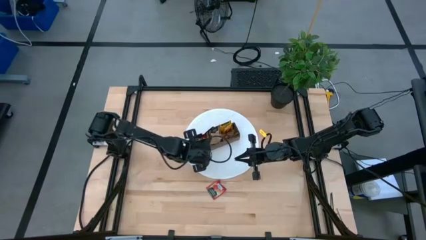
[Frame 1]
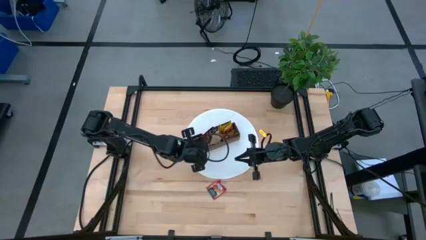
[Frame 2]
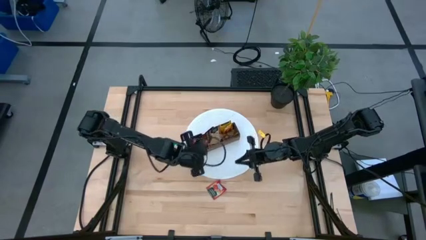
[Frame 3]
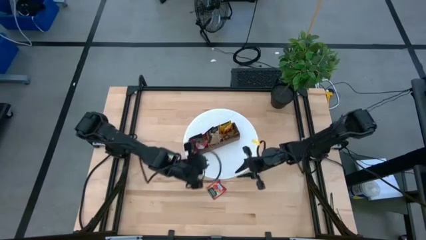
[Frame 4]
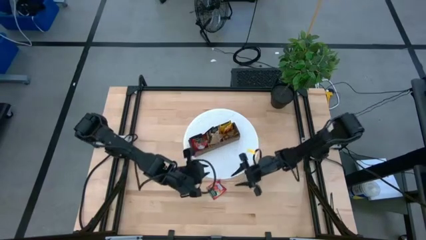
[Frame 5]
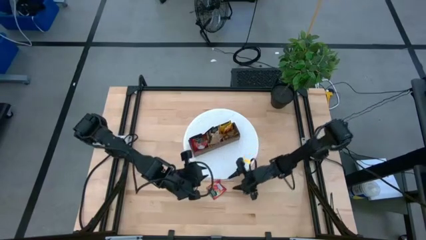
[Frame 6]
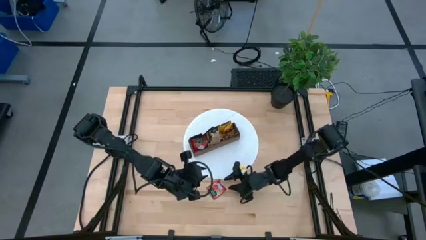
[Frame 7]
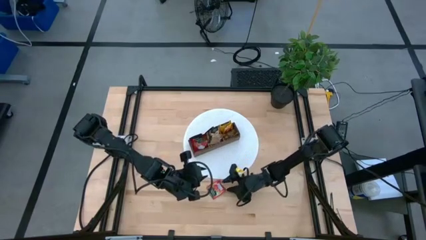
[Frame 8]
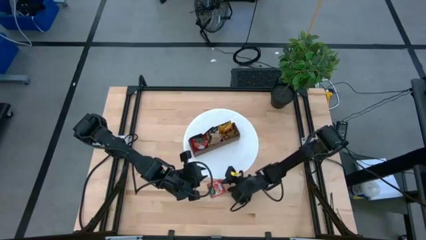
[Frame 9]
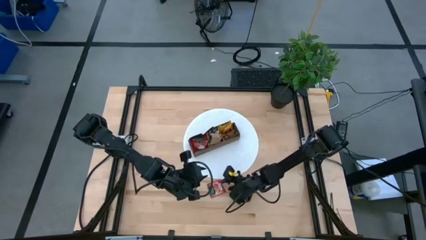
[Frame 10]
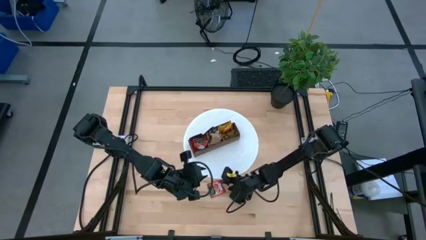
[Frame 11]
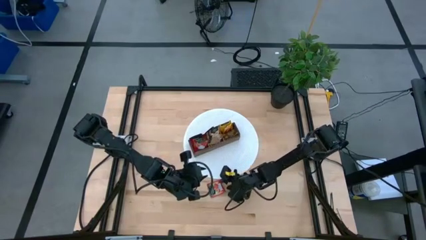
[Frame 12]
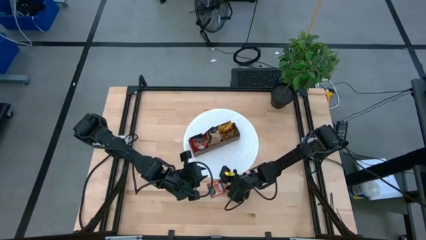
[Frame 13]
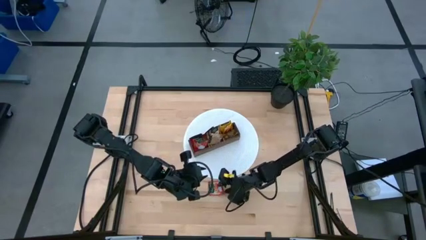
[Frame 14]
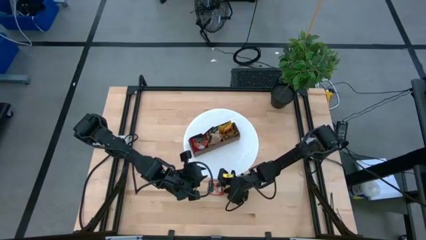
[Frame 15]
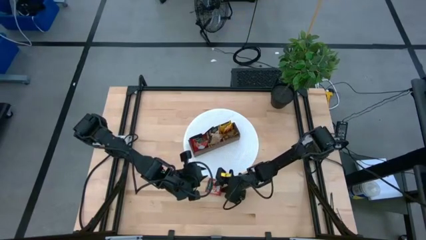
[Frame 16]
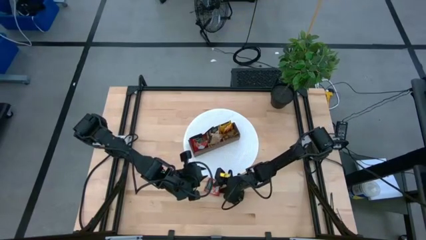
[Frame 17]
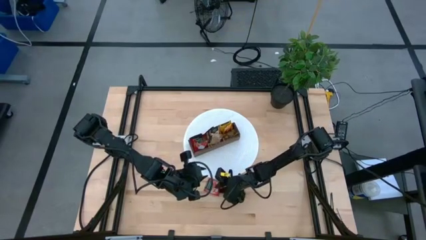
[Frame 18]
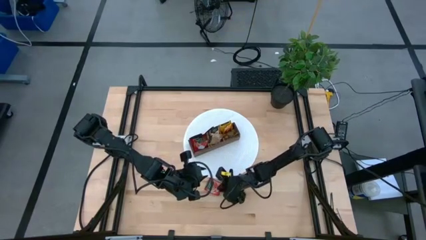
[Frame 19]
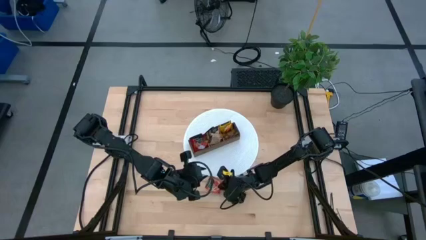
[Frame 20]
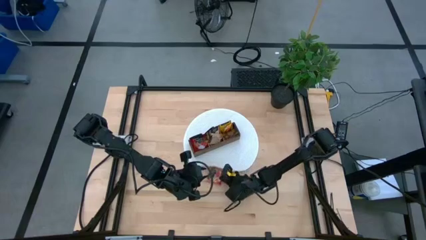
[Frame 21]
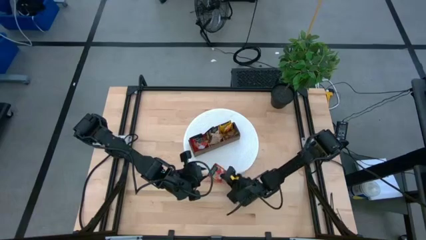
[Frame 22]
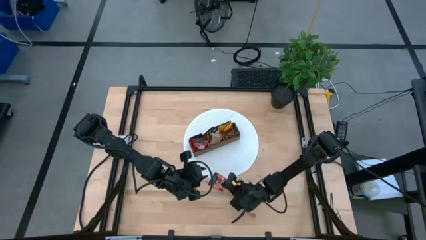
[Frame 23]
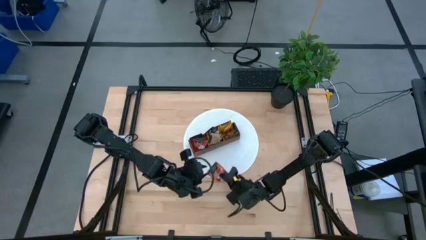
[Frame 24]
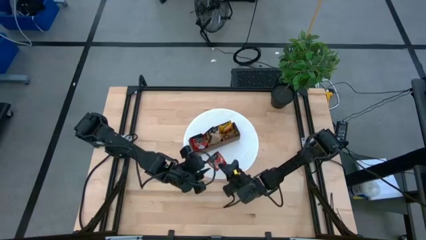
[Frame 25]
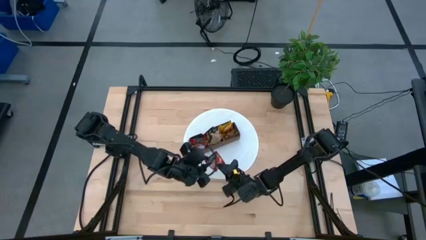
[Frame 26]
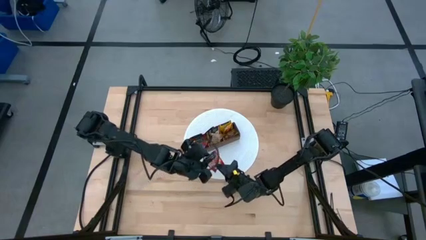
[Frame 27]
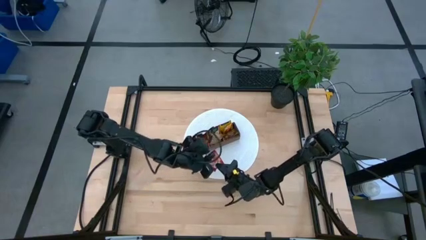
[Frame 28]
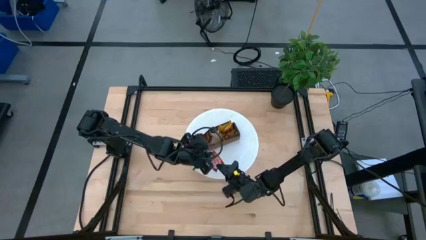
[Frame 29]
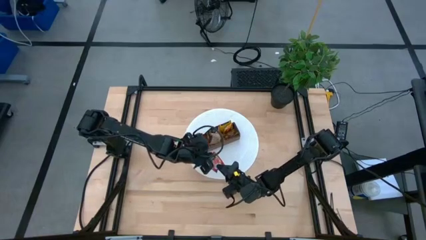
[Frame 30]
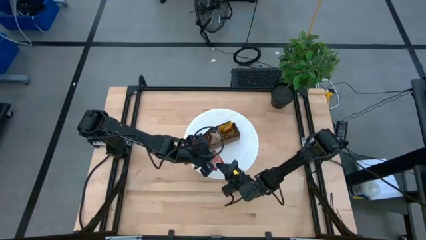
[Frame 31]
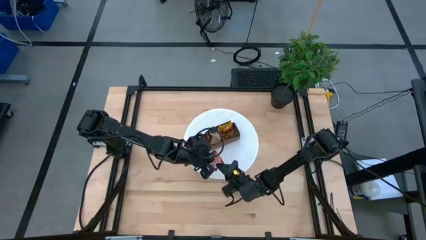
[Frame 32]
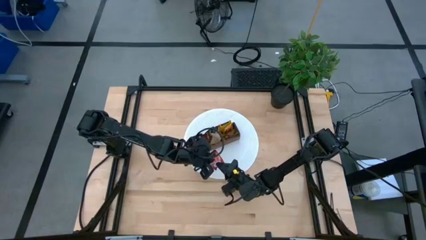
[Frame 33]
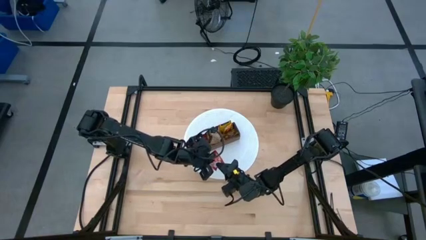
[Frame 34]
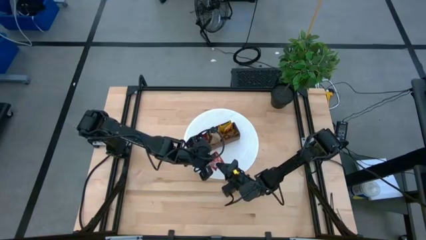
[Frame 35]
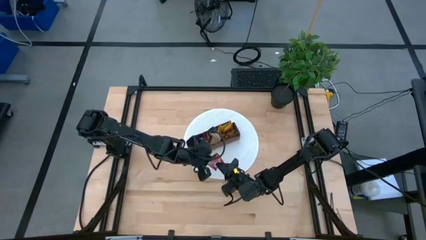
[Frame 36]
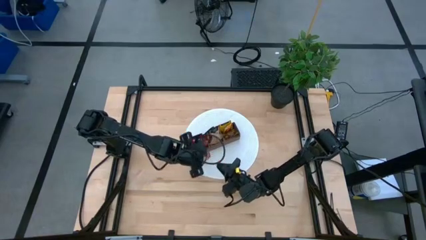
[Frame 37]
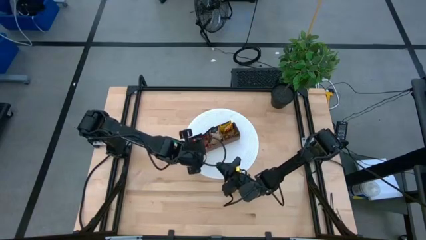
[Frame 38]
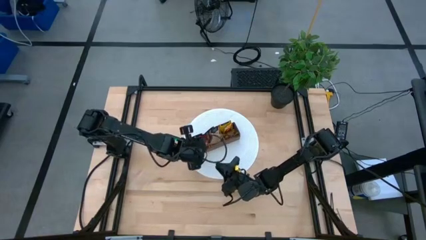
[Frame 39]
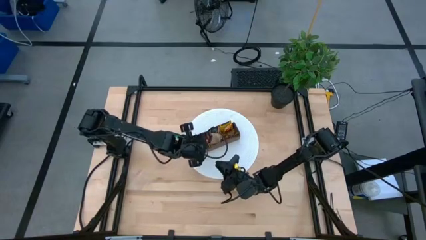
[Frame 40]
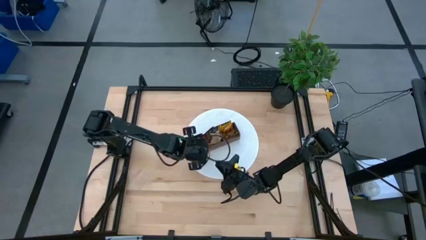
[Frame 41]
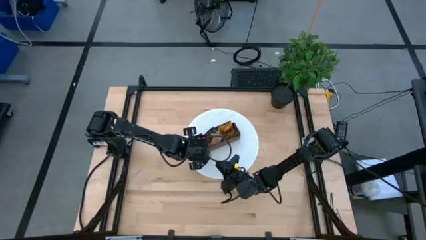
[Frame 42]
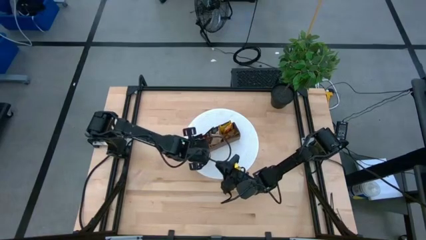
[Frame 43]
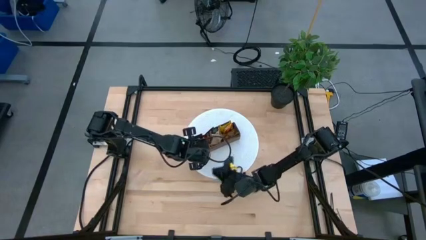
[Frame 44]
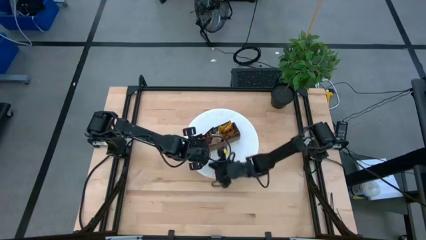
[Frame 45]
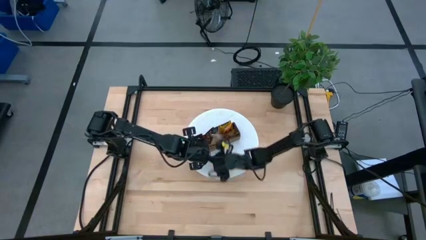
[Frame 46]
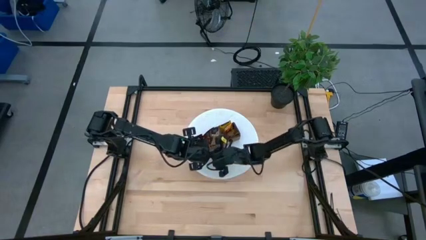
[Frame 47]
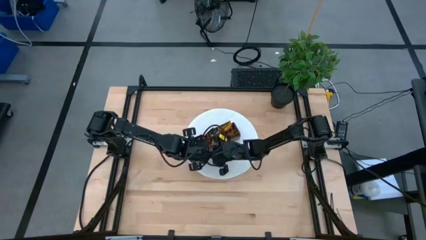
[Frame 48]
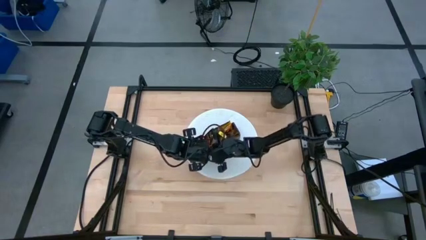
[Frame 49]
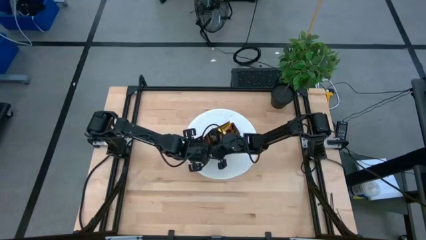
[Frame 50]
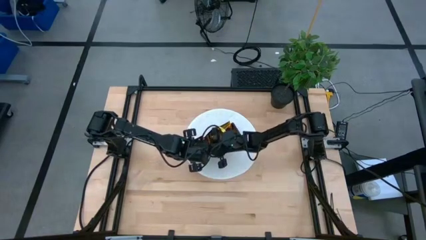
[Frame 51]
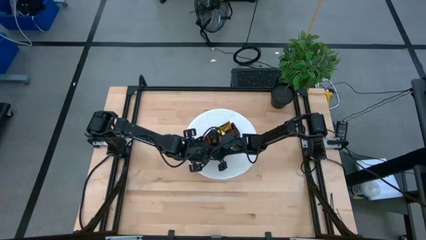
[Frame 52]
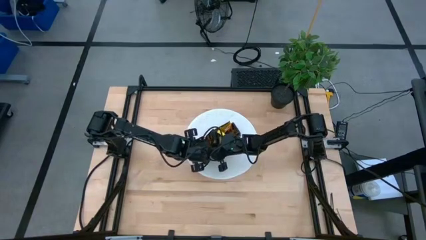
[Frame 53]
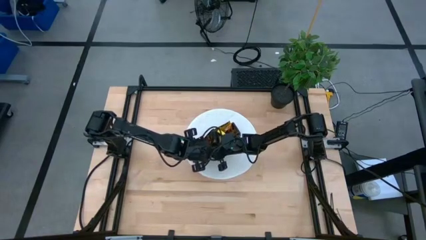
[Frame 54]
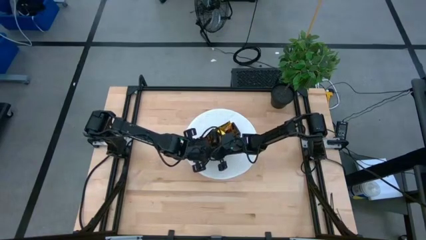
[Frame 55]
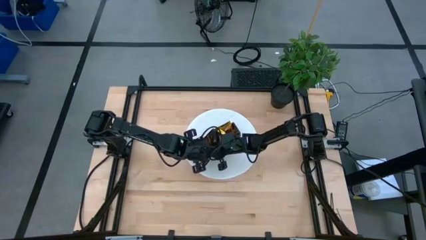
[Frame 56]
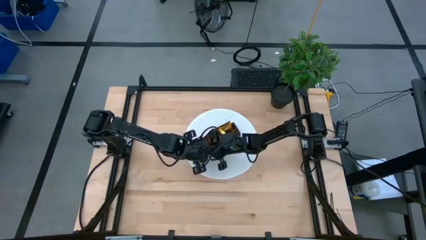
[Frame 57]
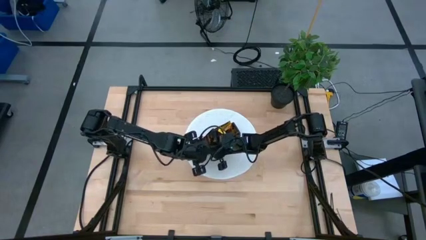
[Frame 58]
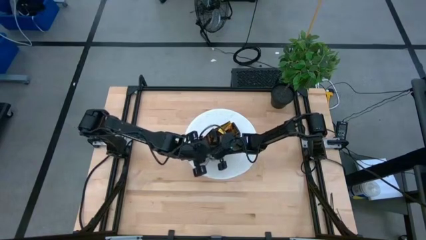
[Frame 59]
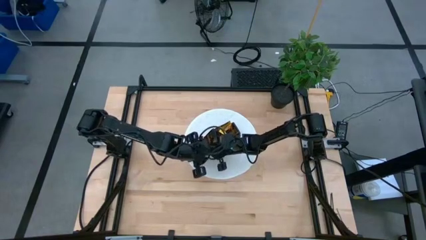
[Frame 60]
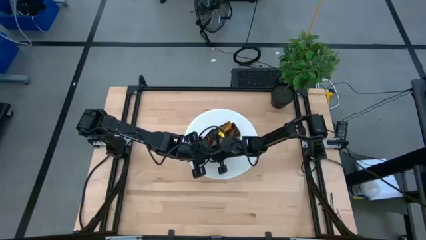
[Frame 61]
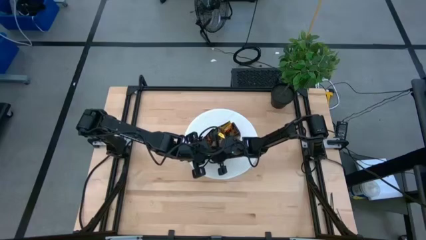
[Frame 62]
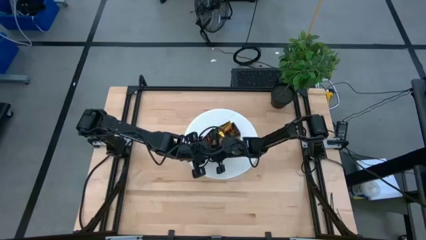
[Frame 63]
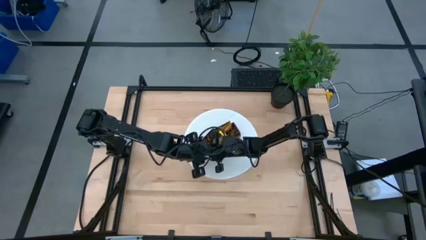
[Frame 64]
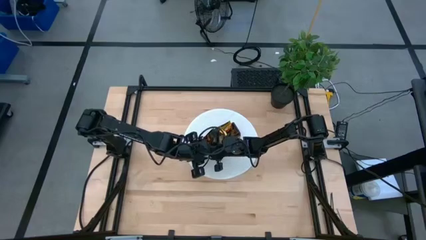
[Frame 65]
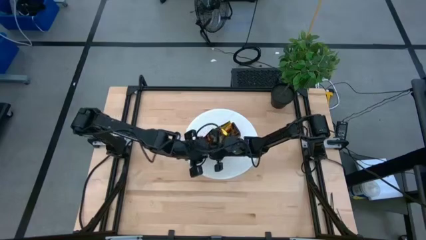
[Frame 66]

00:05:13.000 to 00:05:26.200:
Task: Pick & Place Tea
Put the red tea bag into the left section of the wooden organizer

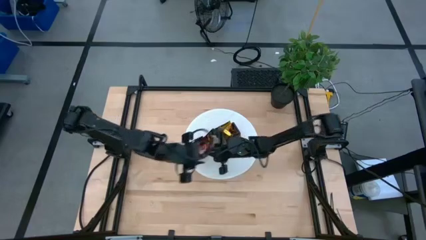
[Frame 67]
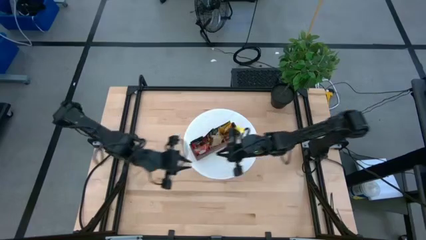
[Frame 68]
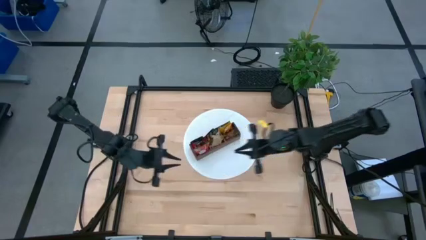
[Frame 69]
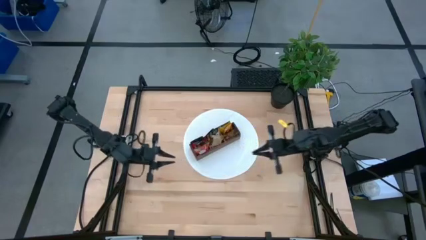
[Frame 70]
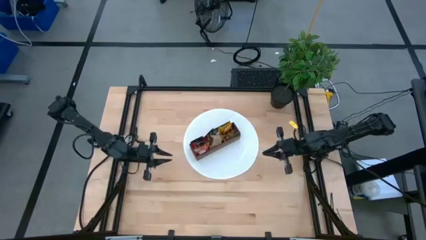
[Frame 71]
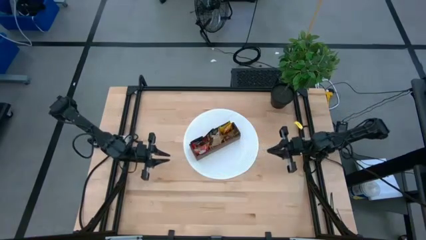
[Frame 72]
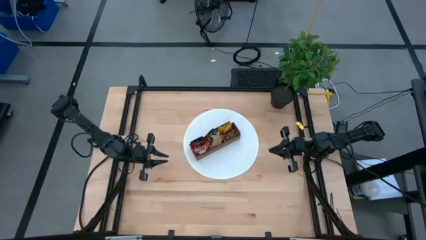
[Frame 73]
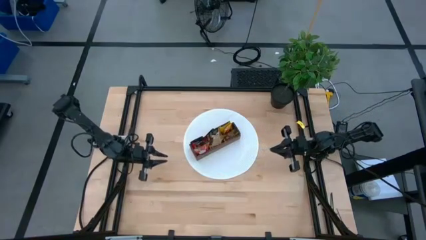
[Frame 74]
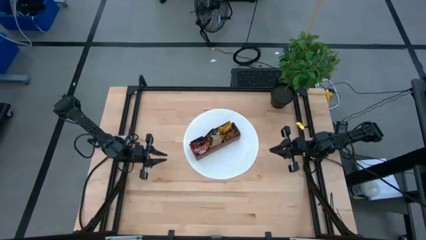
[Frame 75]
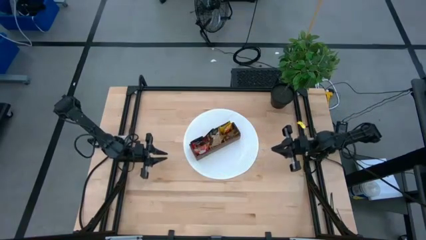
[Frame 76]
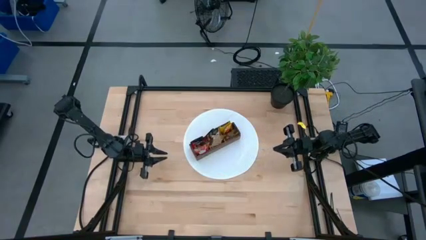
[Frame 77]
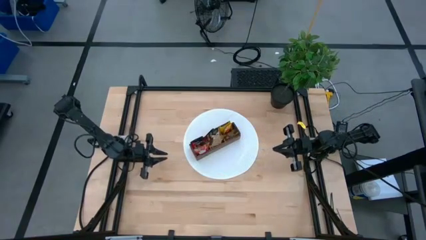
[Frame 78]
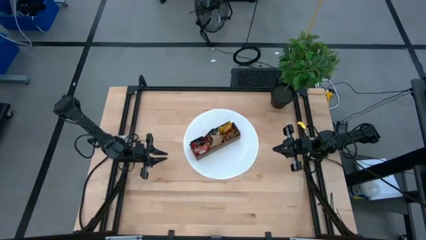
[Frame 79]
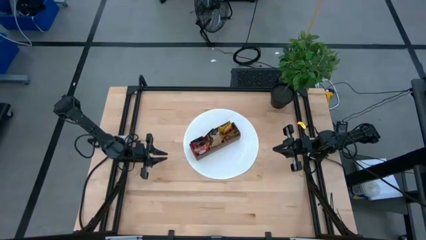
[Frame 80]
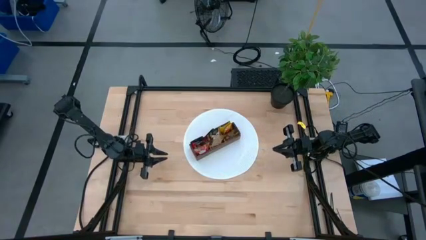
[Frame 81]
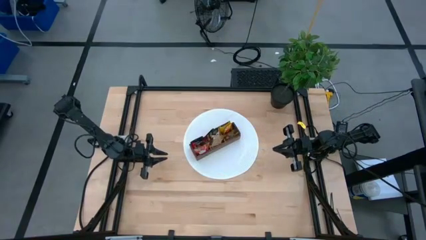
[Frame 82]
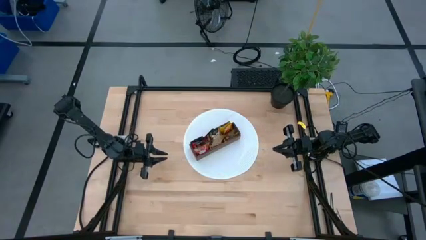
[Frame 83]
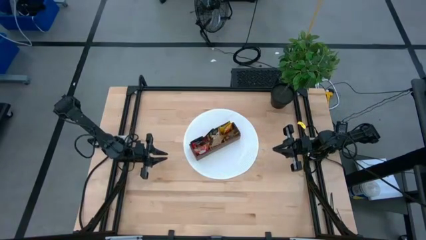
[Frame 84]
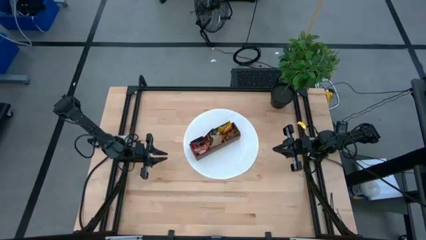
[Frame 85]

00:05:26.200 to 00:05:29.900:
Return to Home Position
